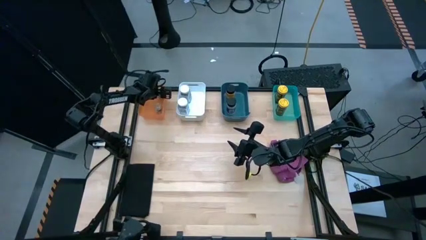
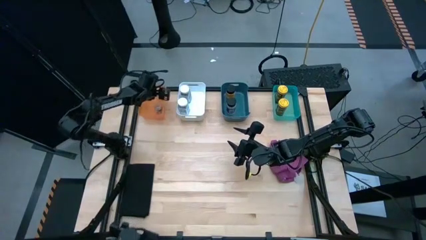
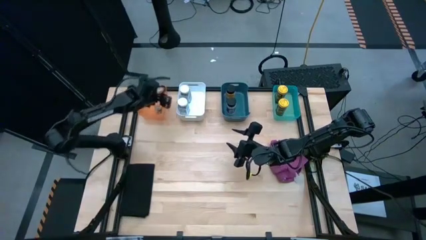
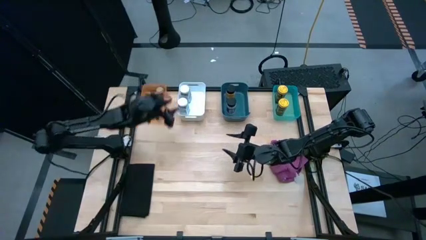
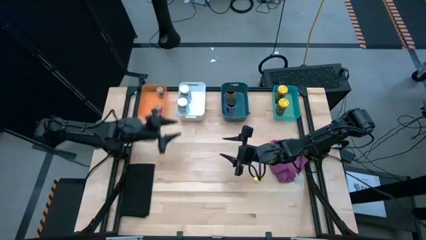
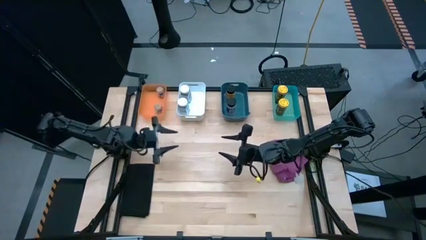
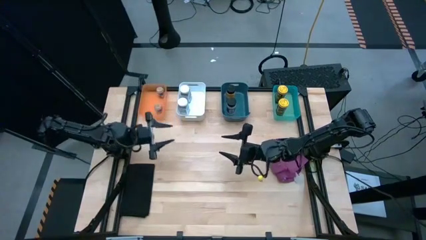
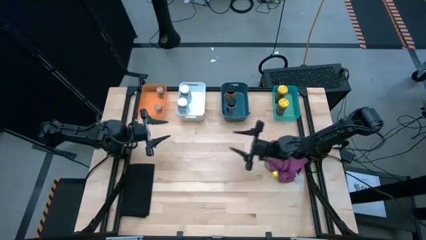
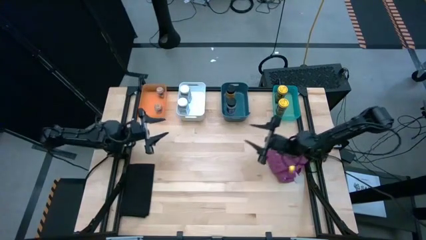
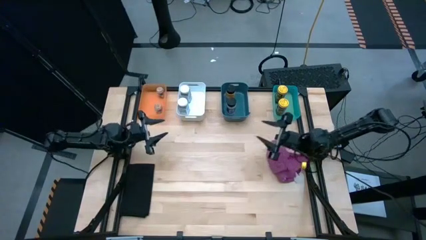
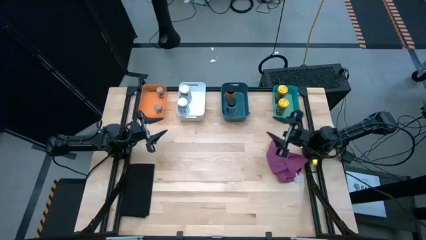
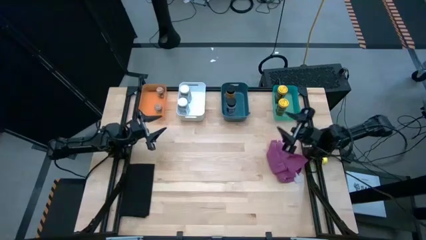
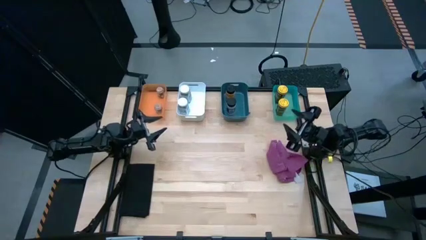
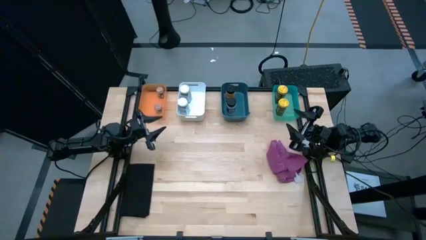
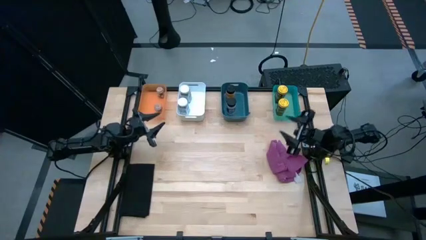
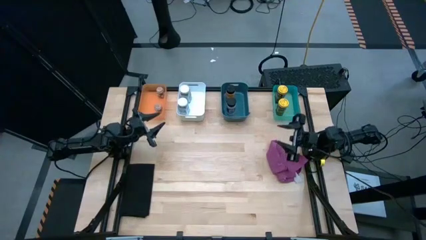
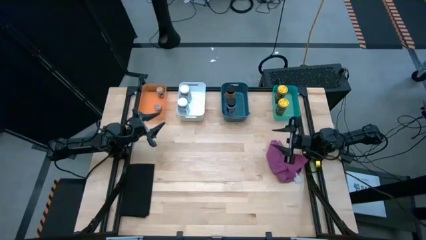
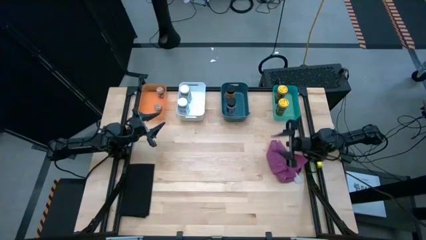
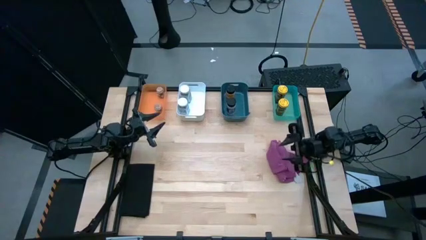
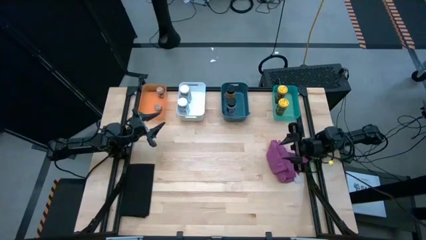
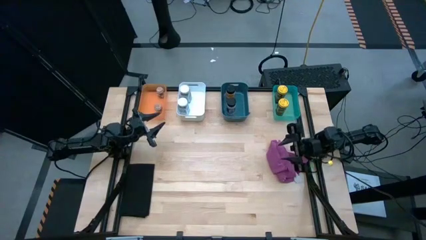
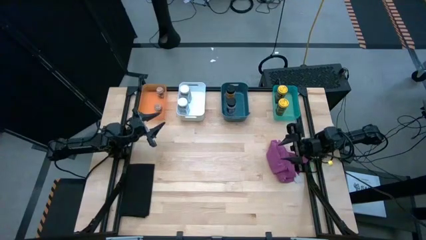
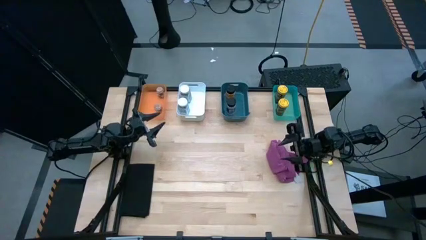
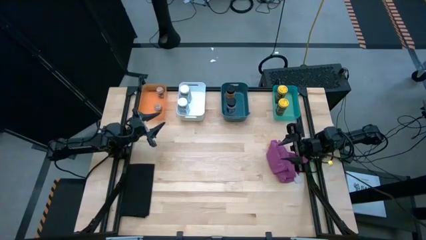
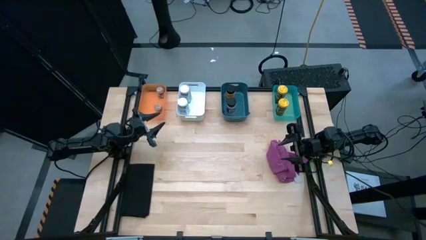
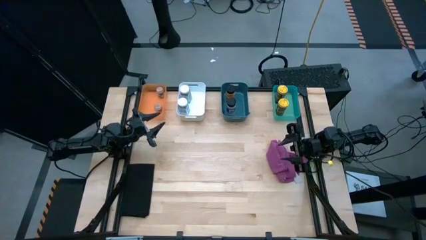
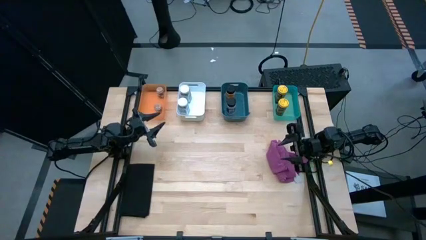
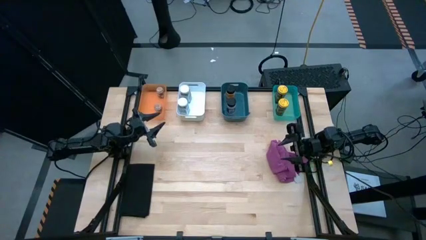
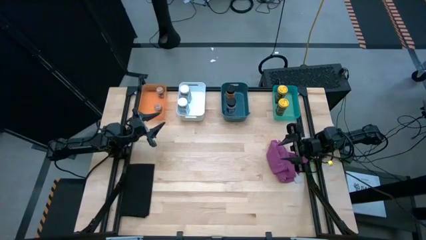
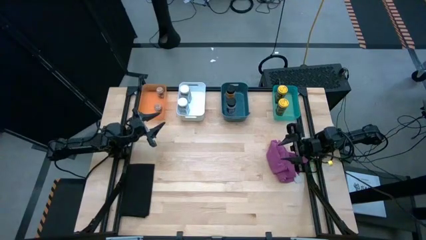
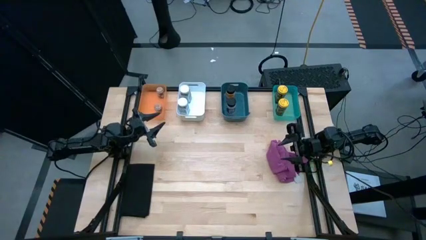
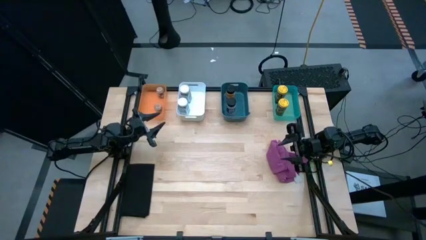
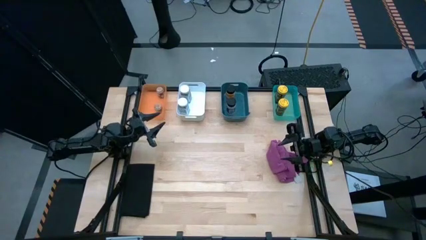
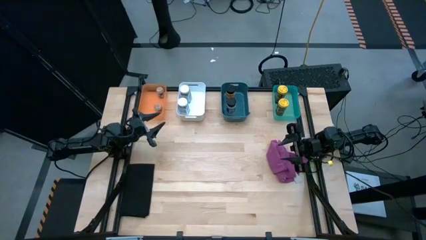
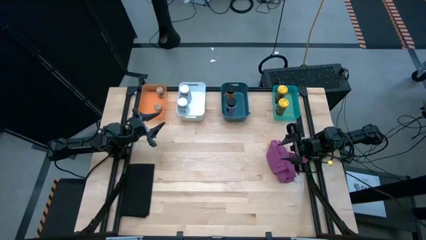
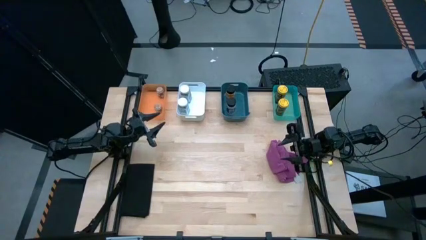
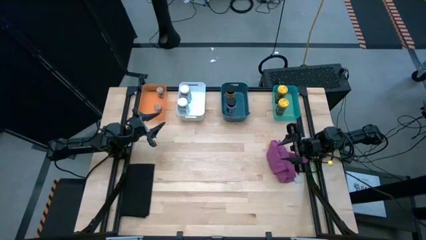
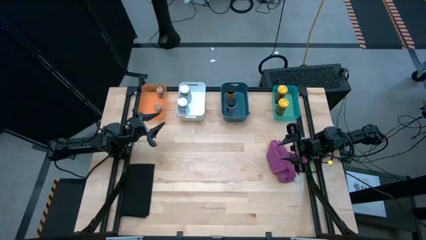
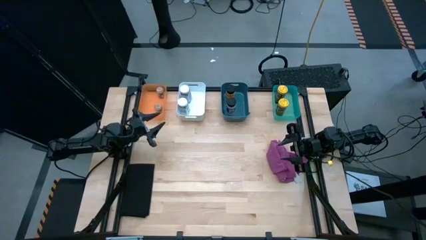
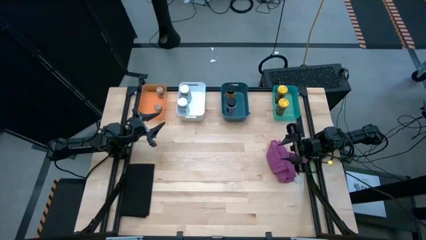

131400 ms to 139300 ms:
Task: Sort spices by type
Return to Home Position

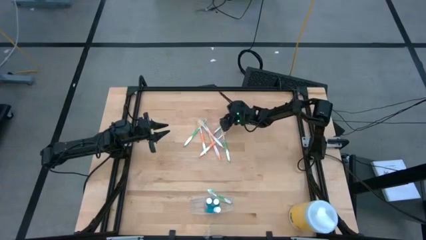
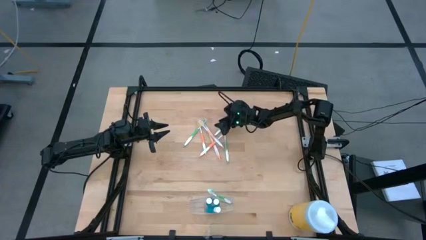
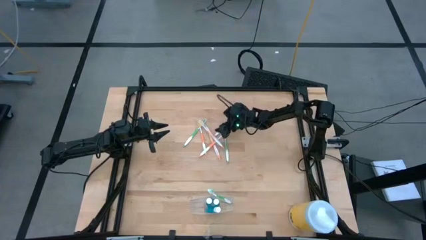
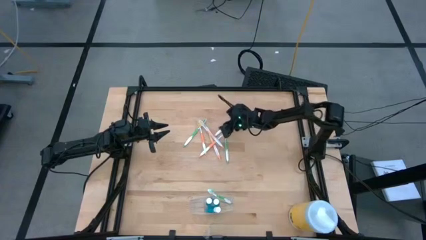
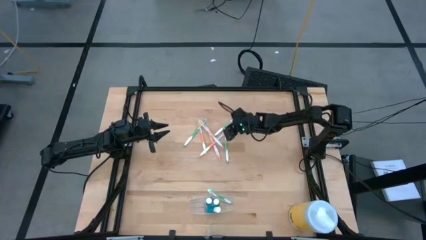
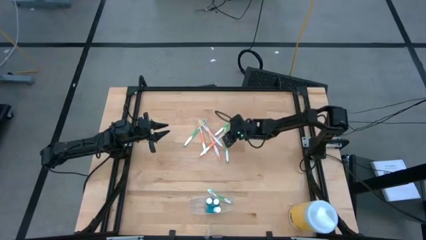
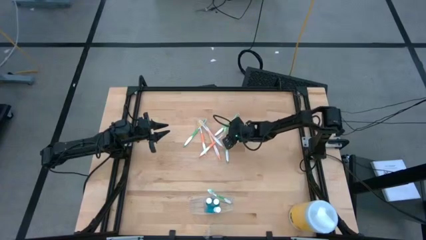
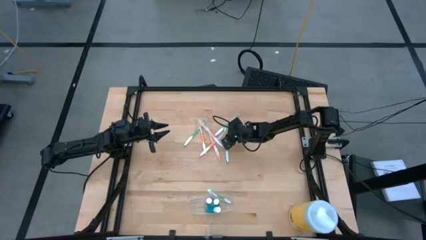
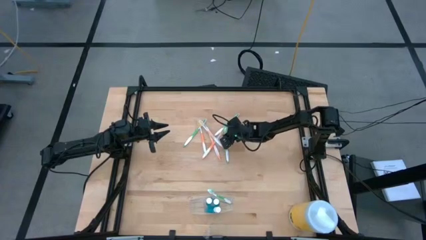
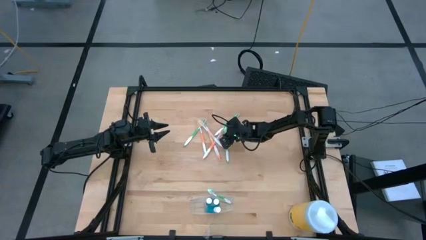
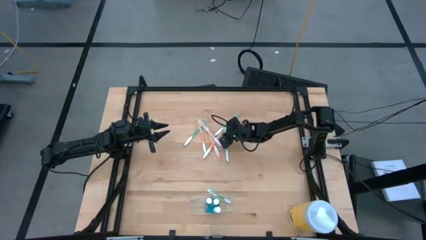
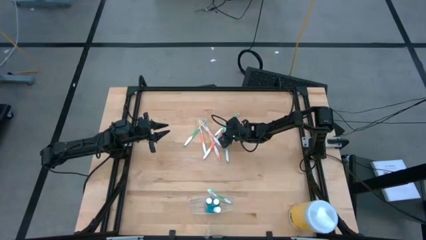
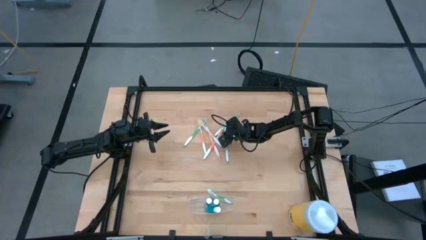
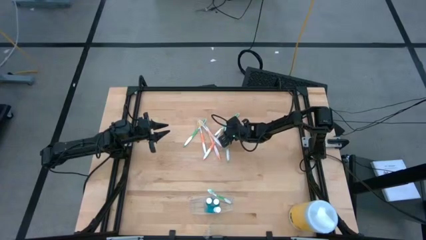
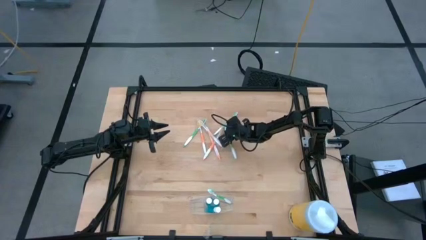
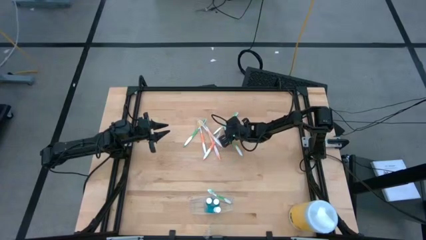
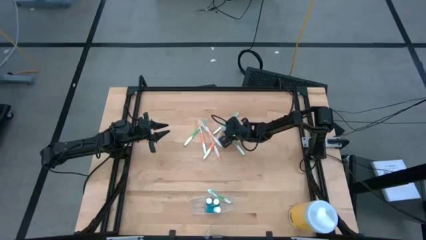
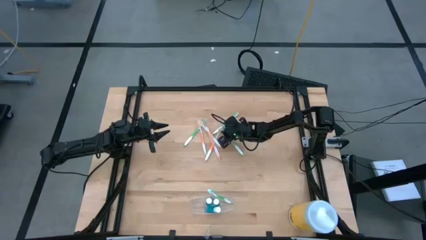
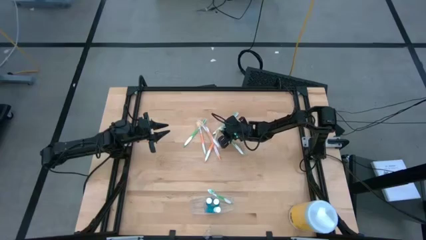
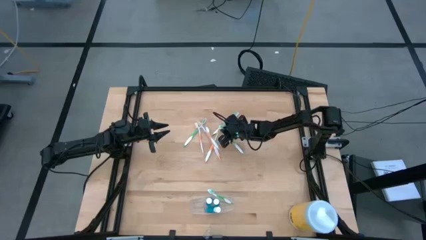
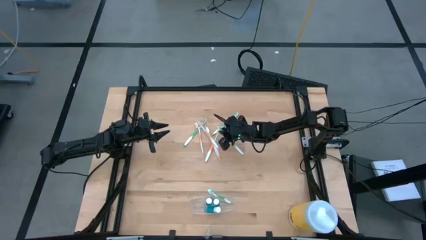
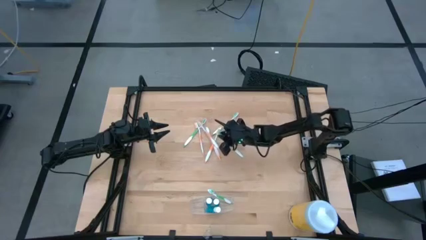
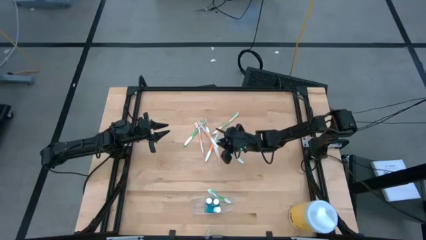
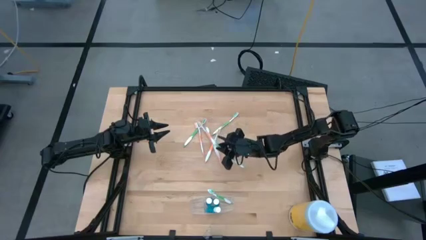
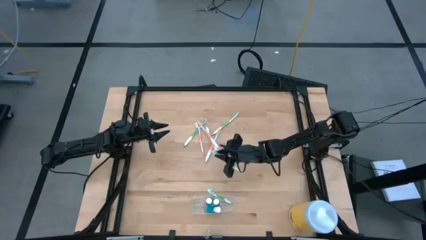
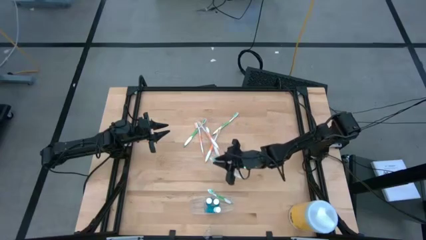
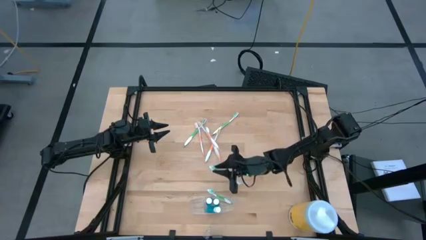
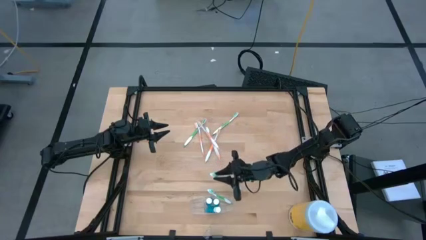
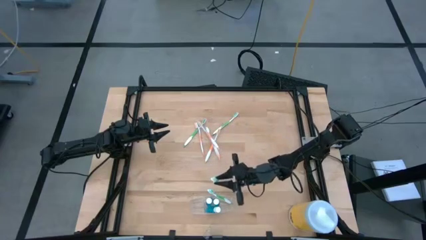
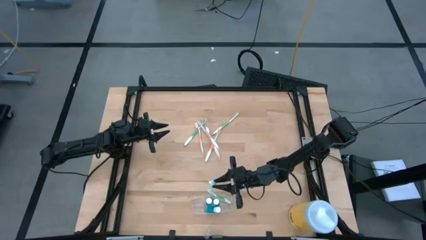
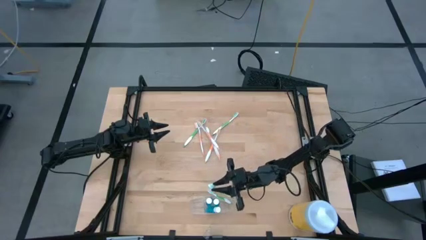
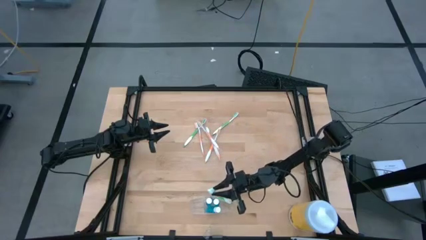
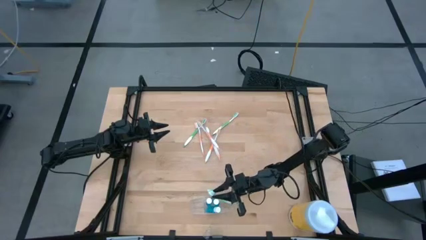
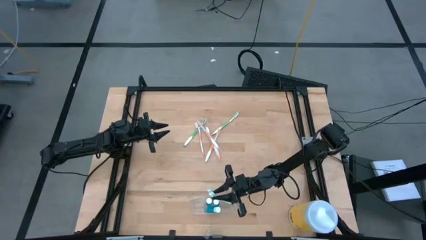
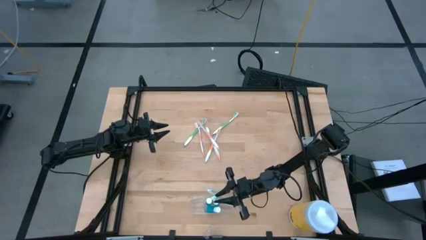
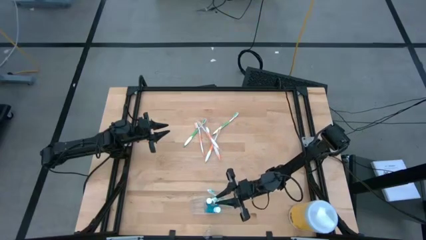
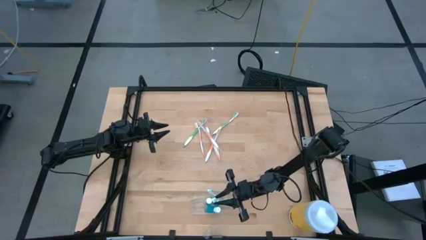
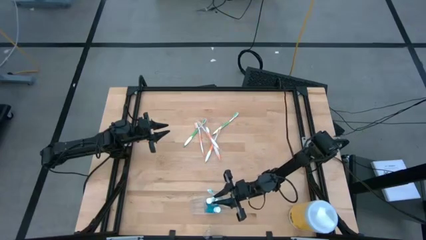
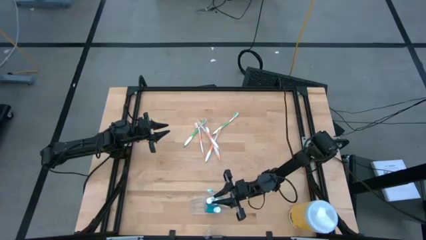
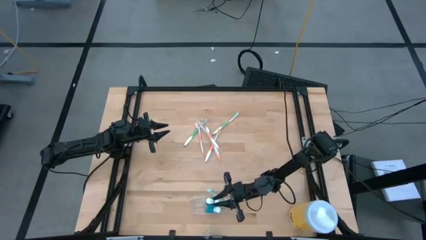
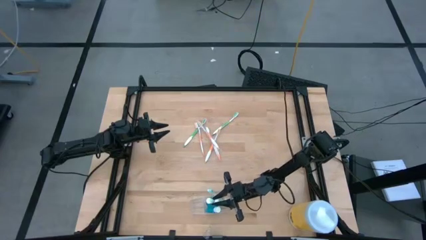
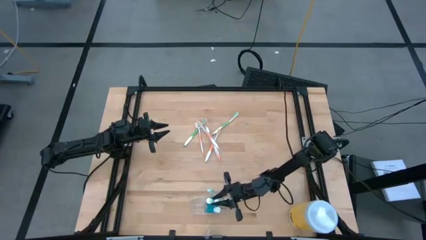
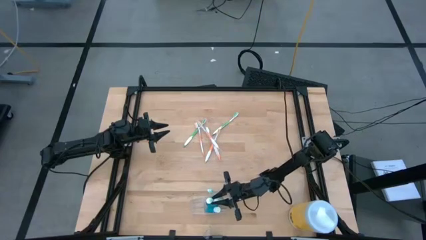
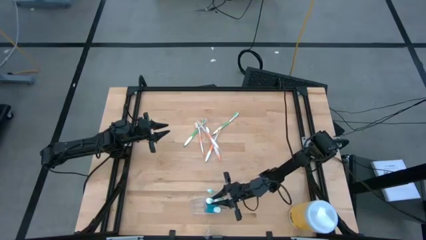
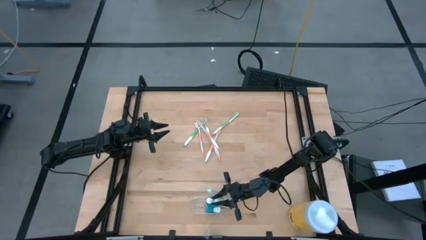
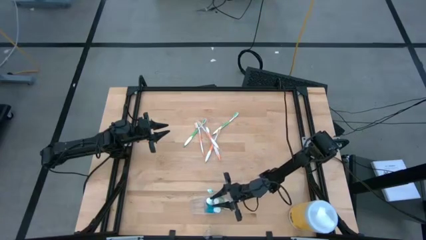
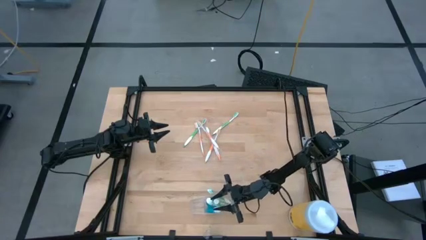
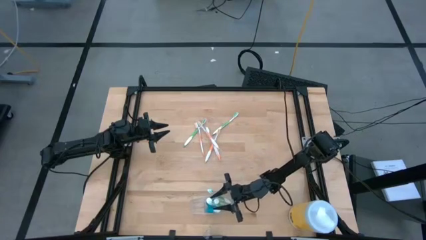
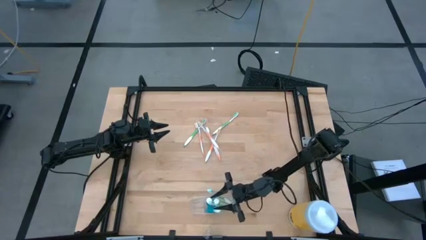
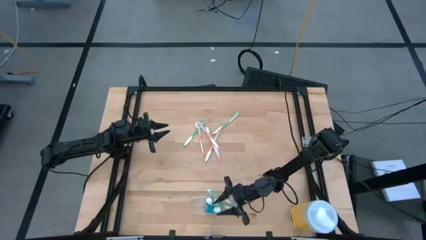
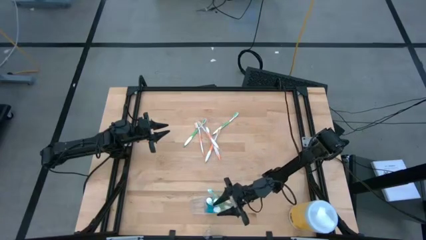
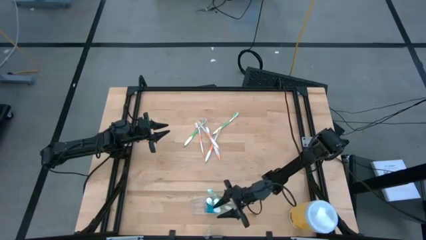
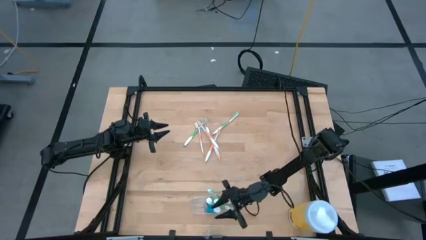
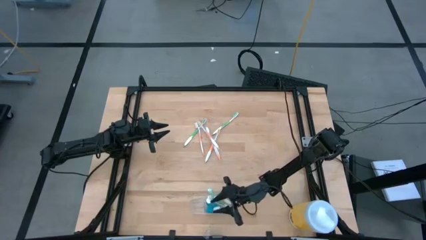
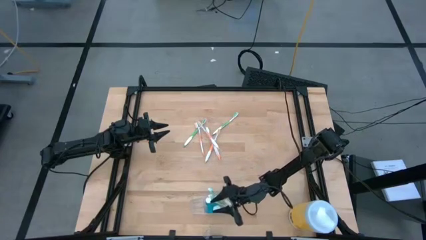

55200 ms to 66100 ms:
Task: Pick & Place toothbrushing station
Put the green toothbrush into the transparent organizer
